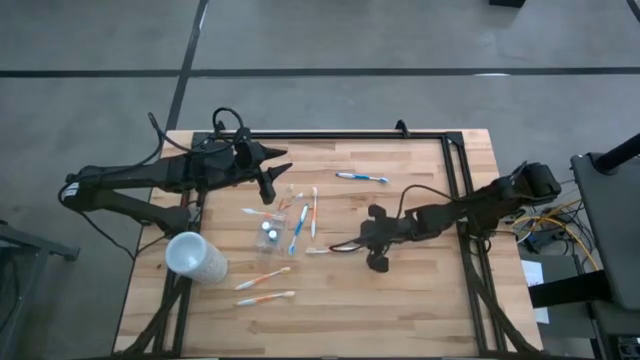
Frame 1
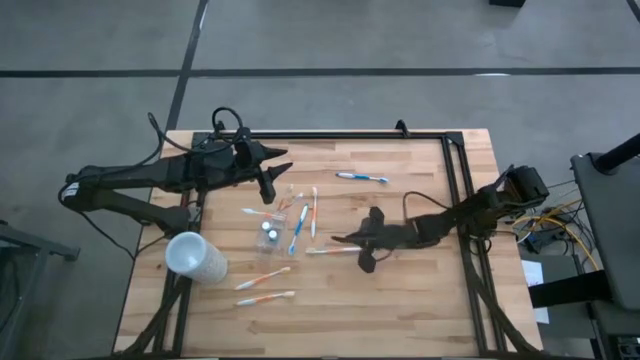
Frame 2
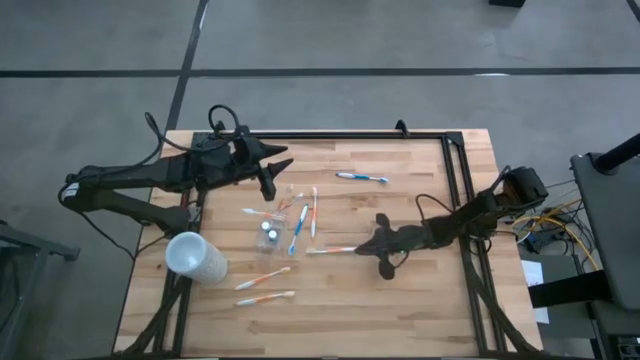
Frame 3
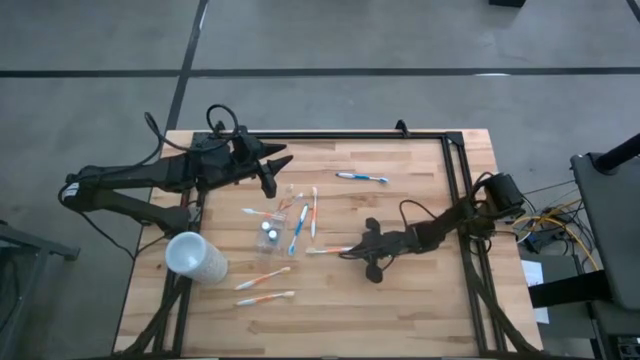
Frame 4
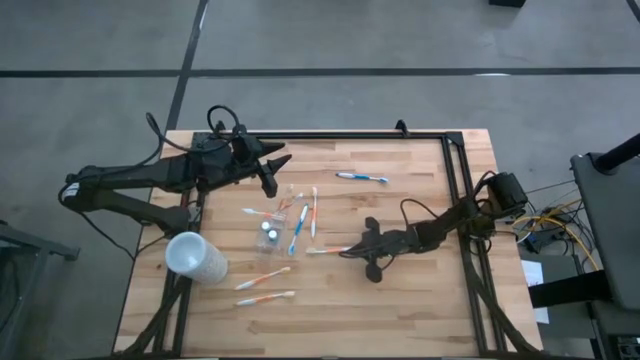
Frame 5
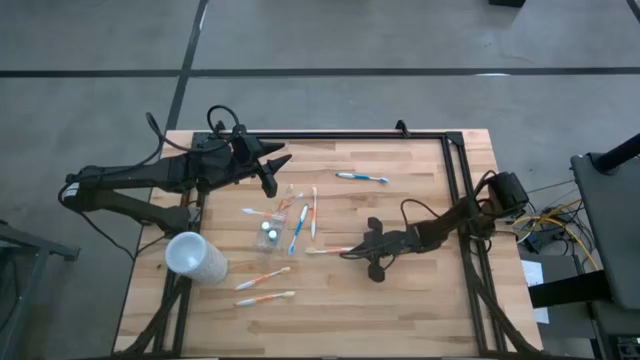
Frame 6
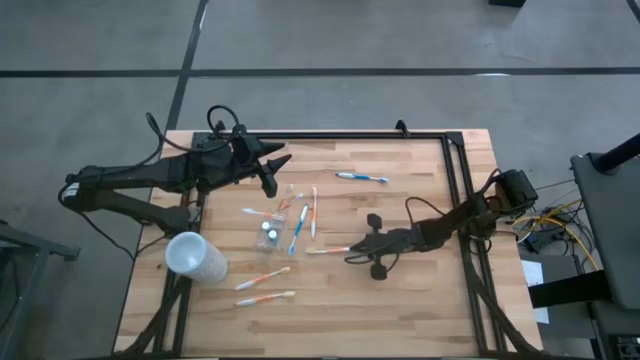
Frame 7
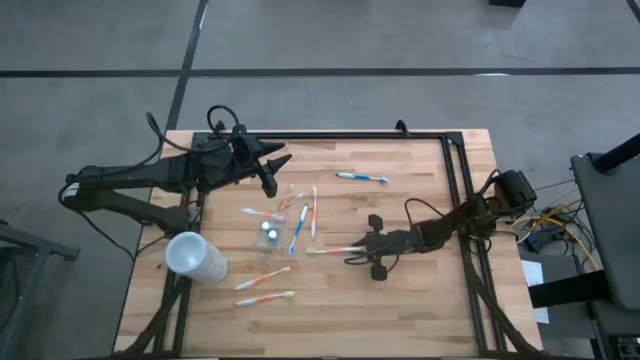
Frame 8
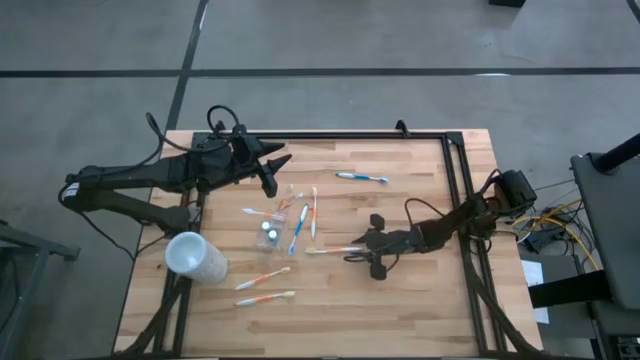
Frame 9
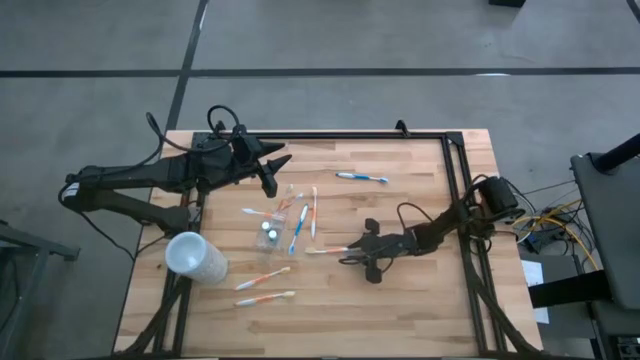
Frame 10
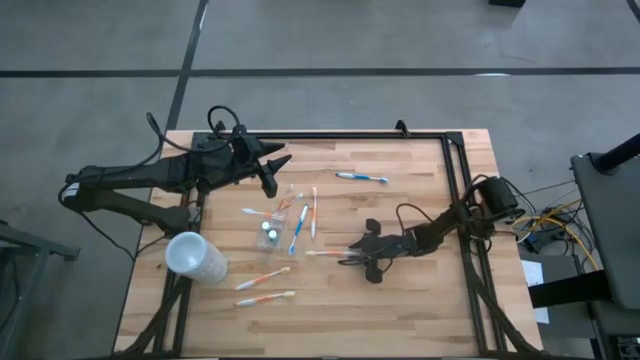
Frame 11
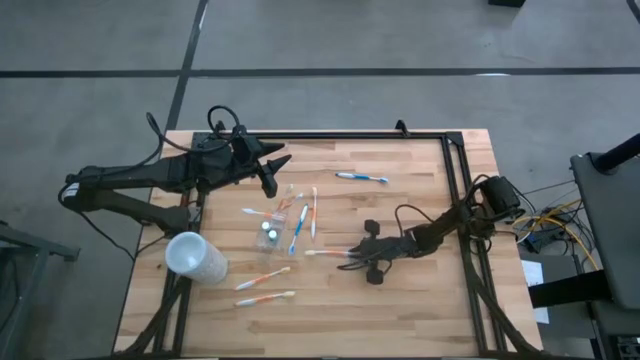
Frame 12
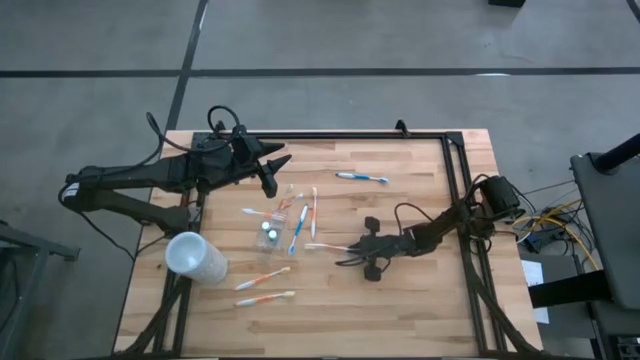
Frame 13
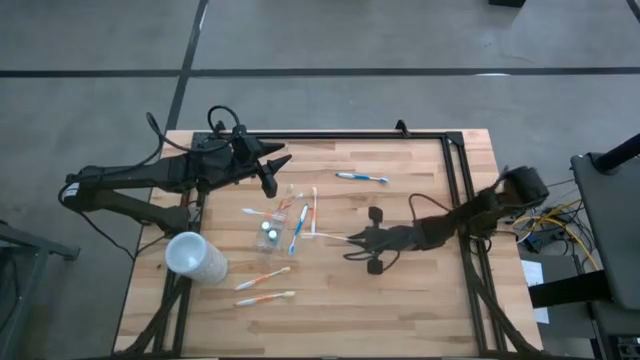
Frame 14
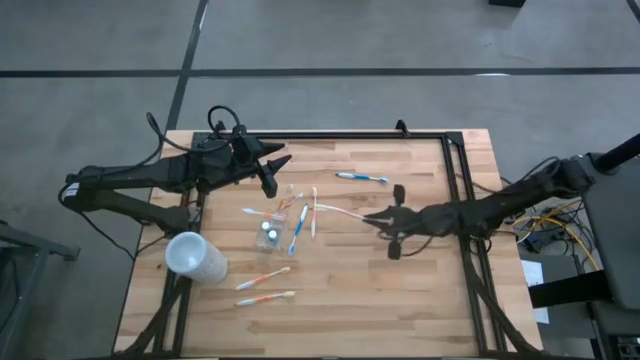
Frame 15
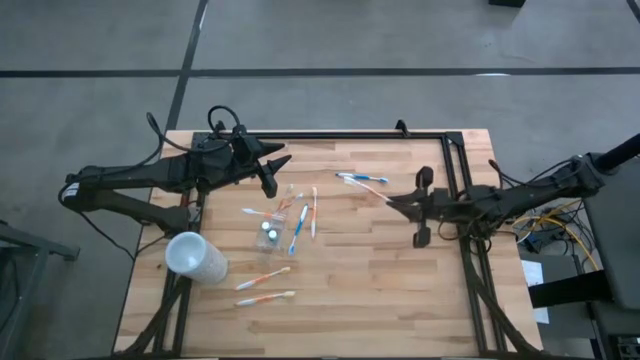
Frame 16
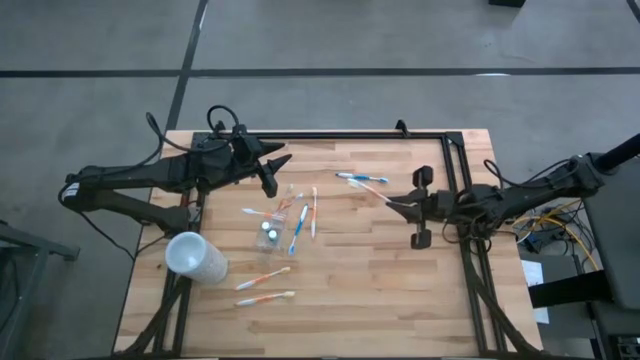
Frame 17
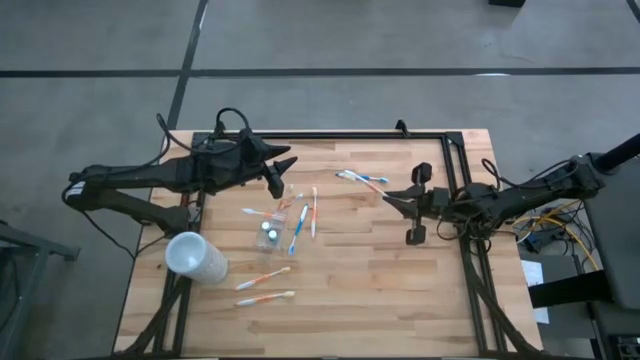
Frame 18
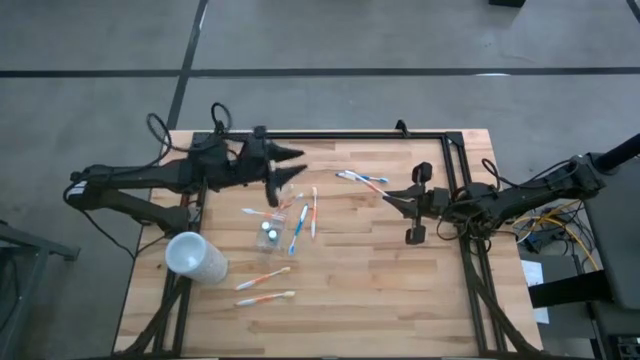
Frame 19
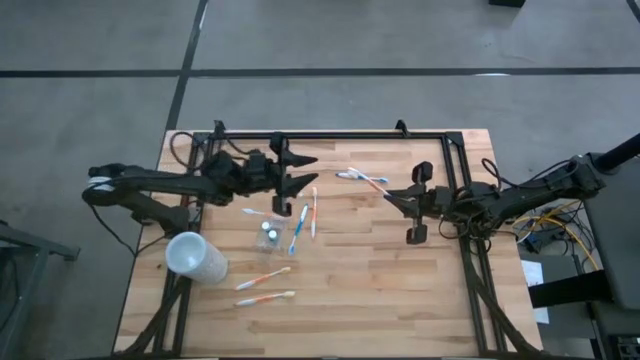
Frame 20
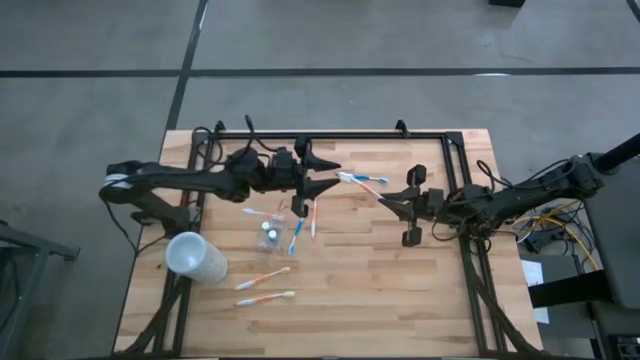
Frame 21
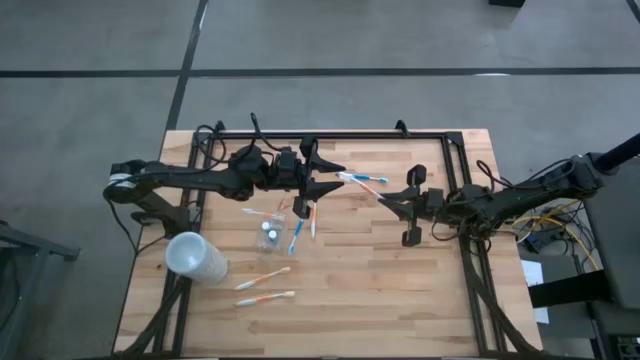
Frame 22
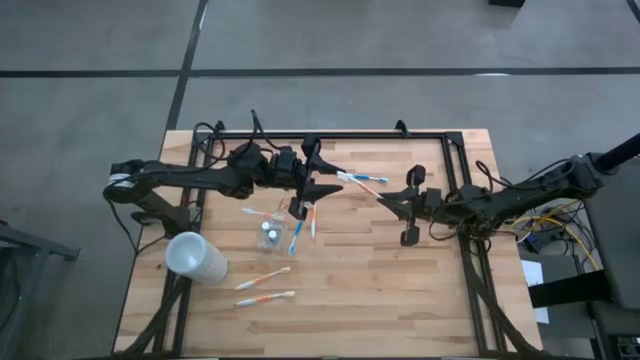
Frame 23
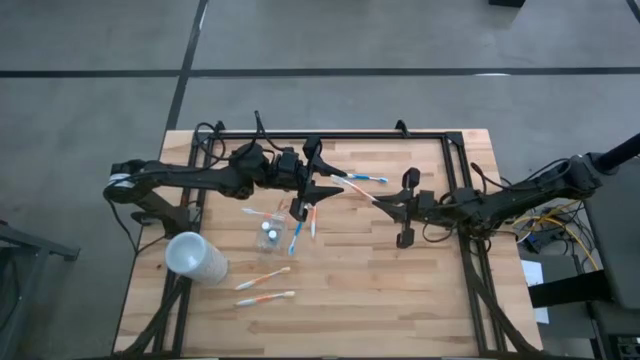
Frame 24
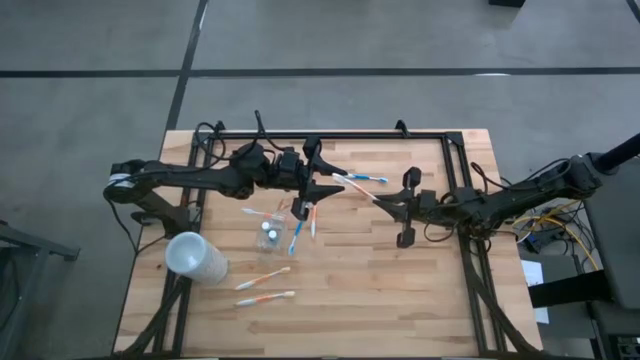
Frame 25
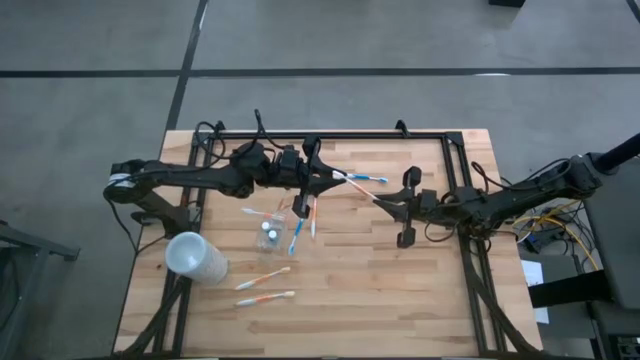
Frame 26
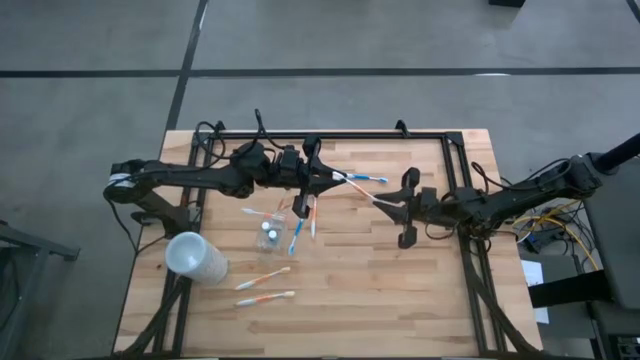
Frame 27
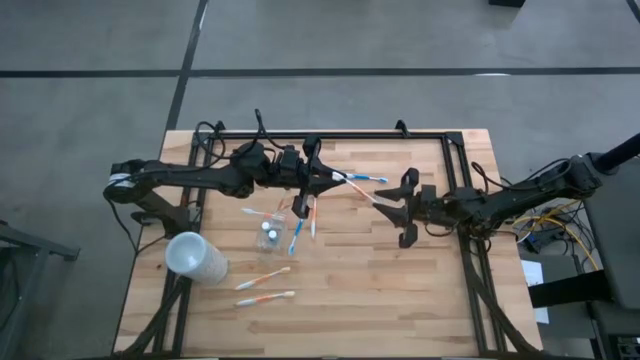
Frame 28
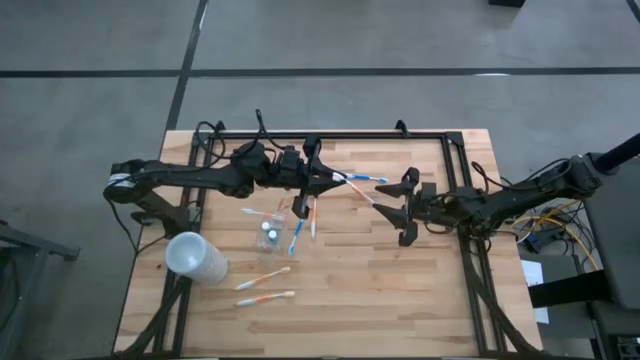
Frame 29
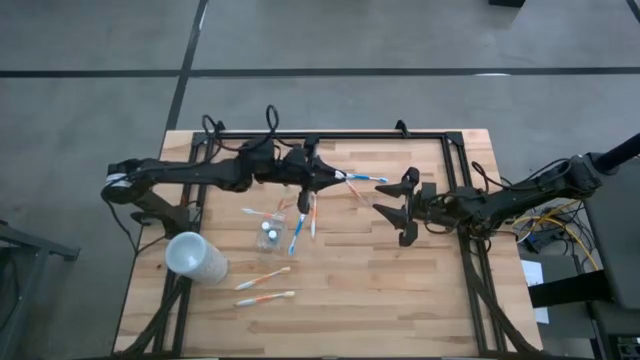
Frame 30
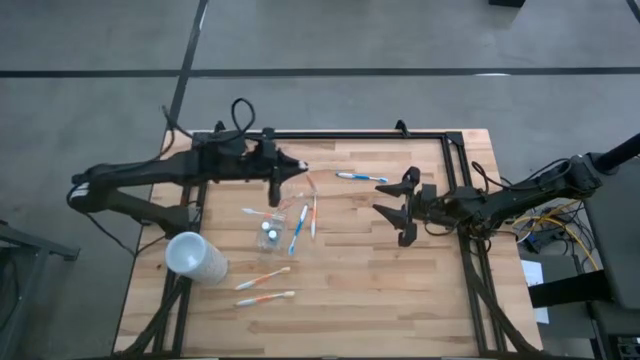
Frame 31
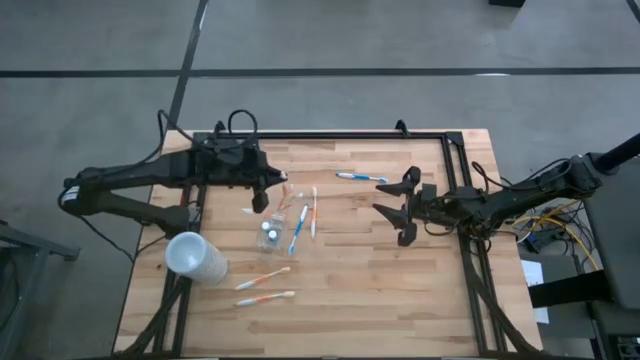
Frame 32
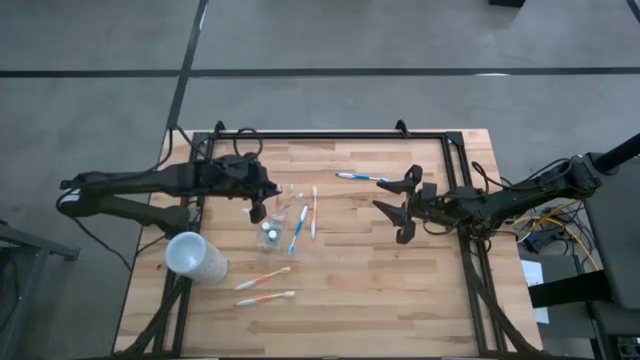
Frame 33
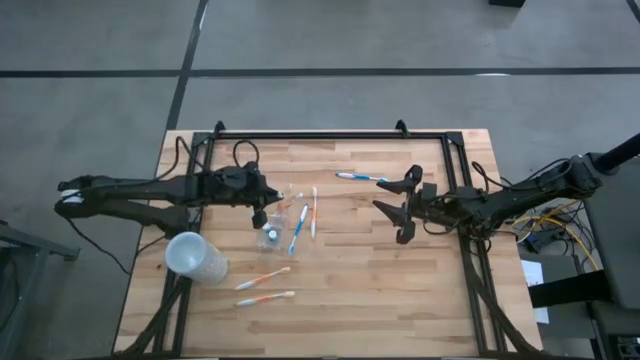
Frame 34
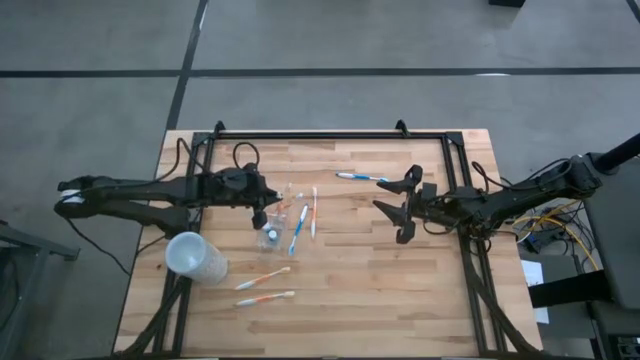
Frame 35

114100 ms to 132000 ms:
Task: Pick & Place toothbrushing station
Put the orange toothbrush into the transparent organizer

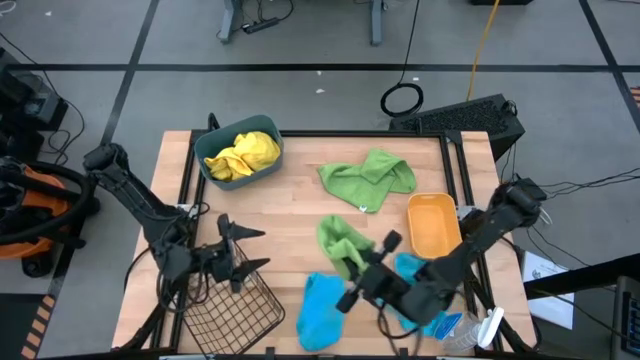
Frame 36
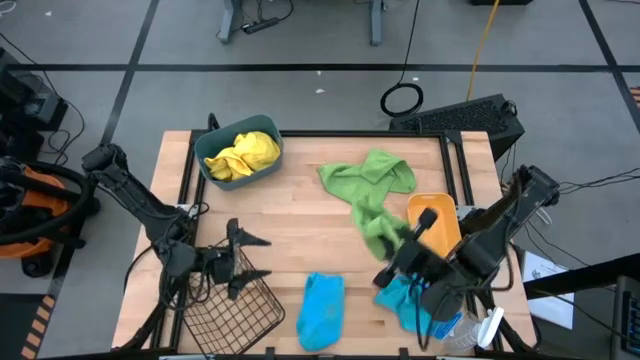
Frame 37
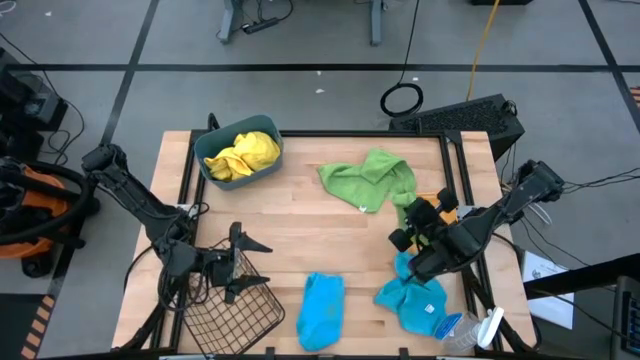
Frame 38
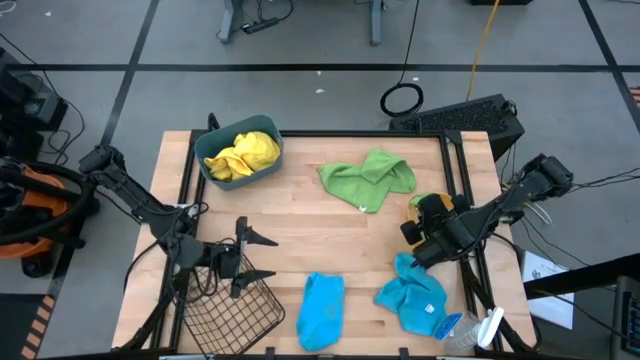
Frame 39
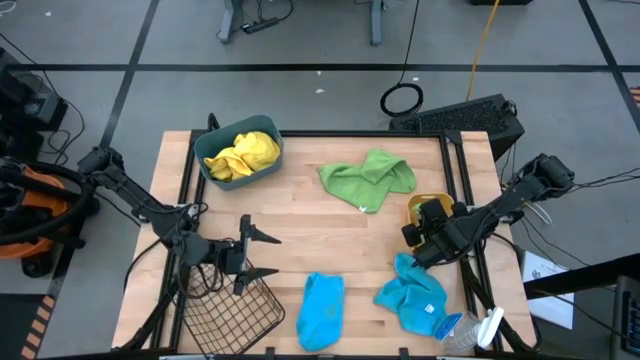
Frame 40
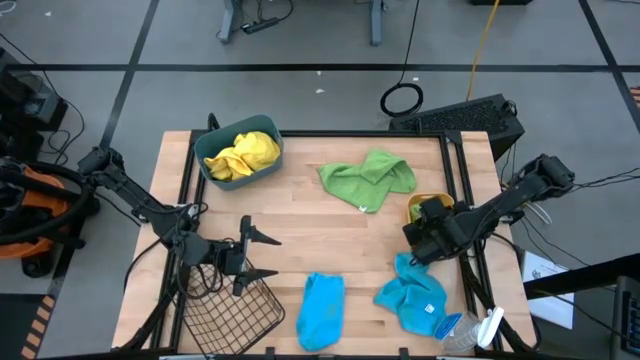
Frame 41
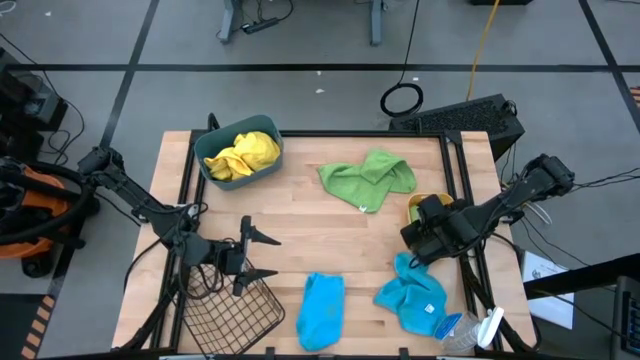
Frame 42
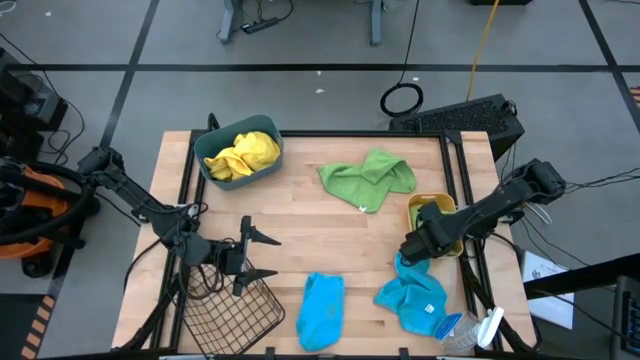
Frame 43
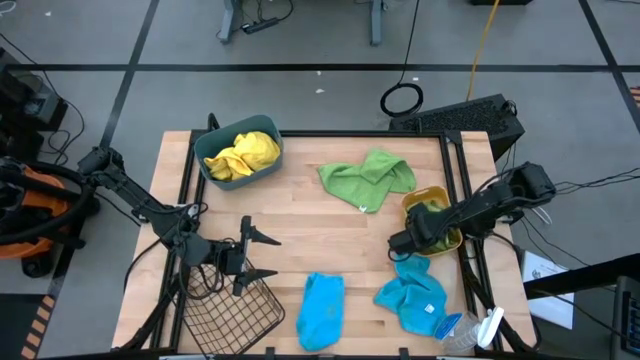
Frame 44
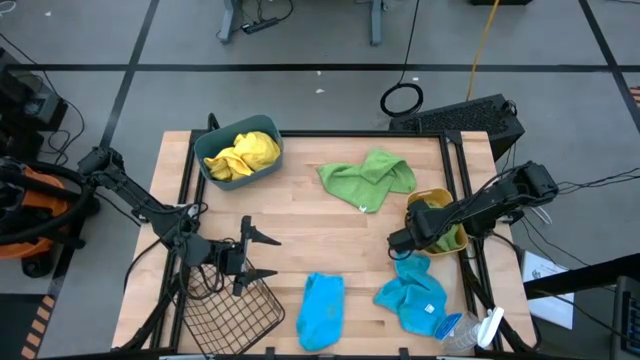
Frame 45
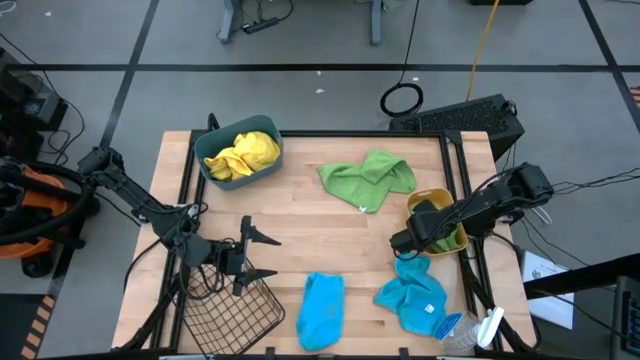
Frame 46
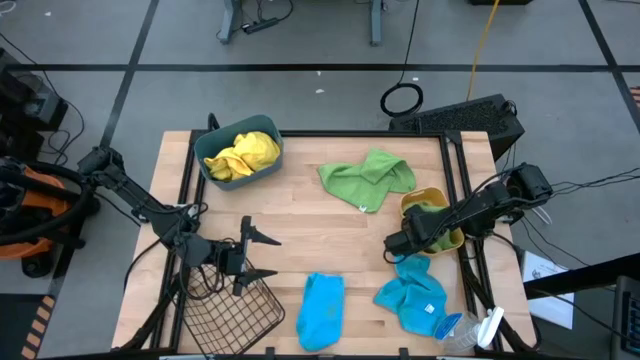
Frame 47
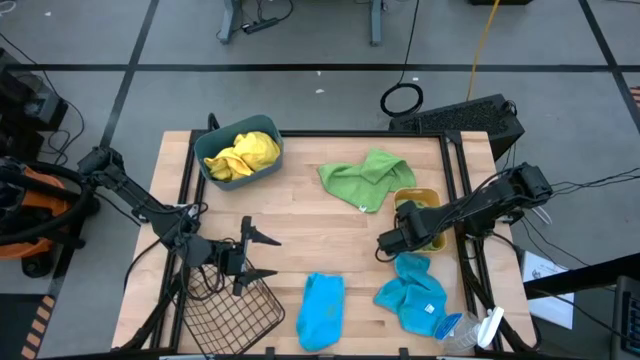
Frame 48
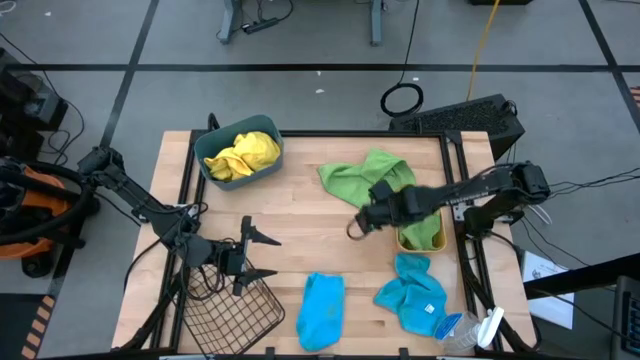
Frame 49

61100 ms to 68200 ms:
Task: Sort microfiber towel by color & place in baskets
Put lower left green towel into the orange bin
